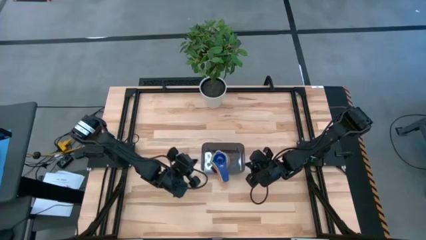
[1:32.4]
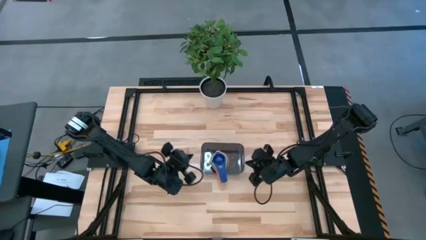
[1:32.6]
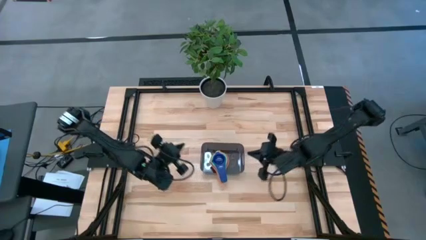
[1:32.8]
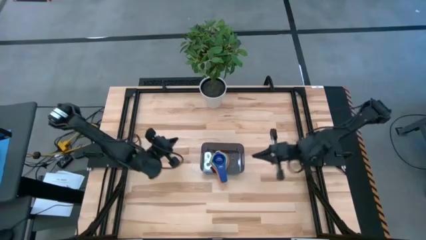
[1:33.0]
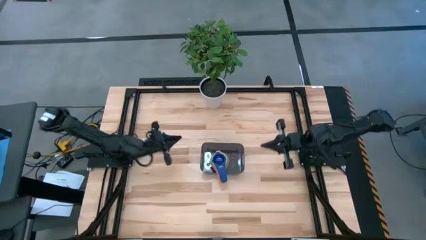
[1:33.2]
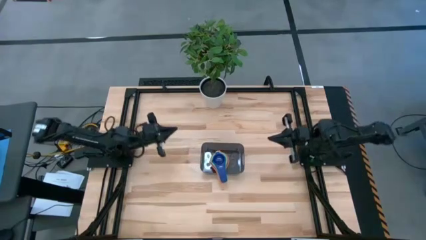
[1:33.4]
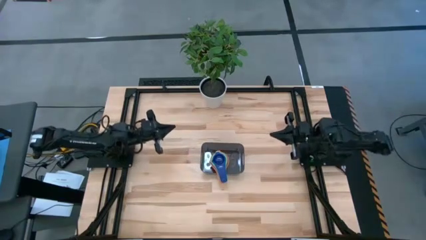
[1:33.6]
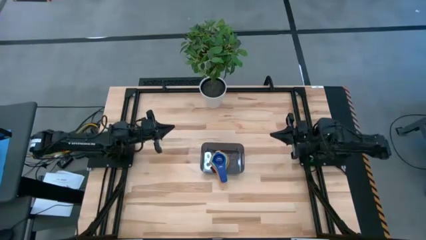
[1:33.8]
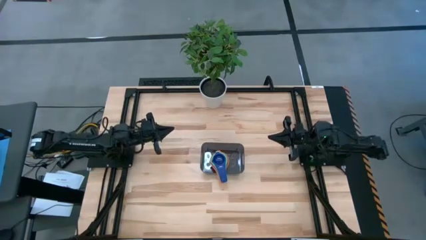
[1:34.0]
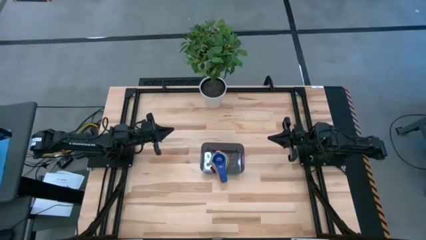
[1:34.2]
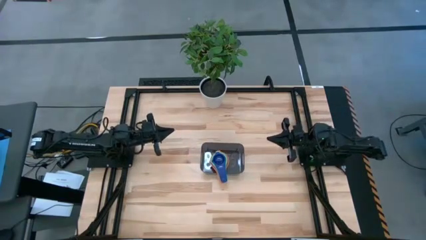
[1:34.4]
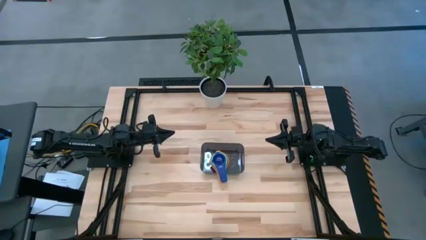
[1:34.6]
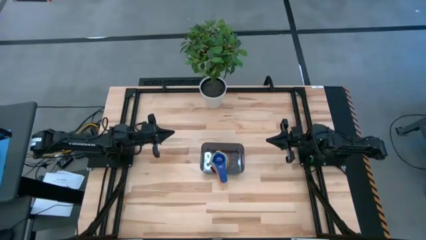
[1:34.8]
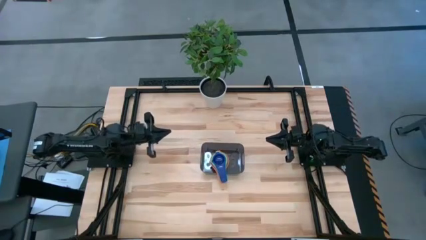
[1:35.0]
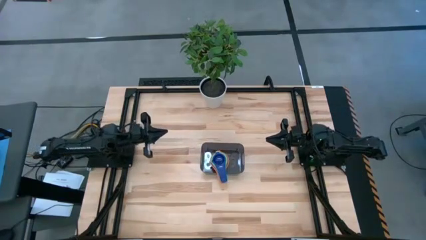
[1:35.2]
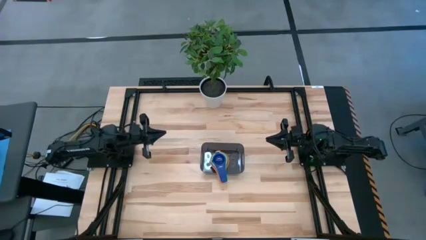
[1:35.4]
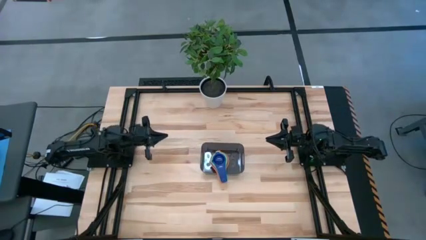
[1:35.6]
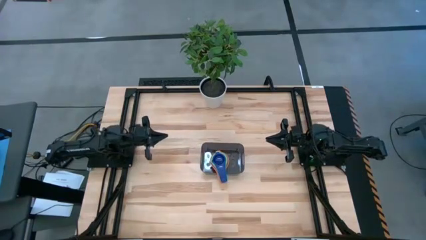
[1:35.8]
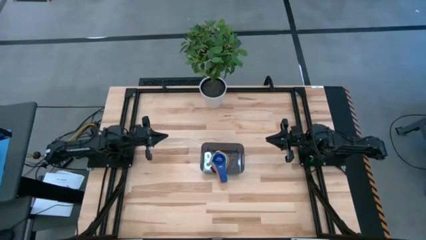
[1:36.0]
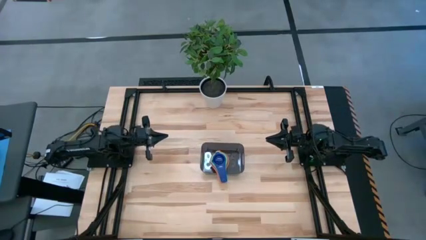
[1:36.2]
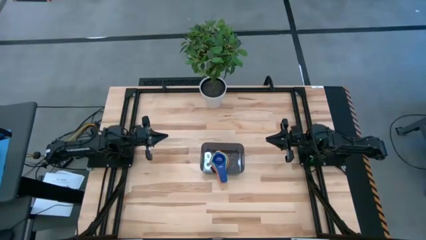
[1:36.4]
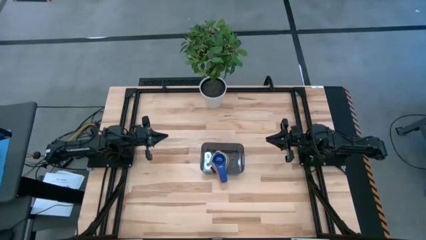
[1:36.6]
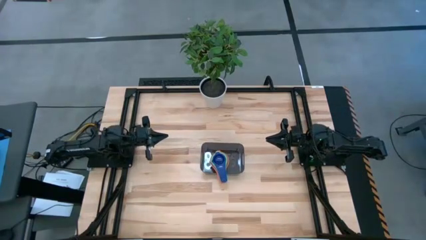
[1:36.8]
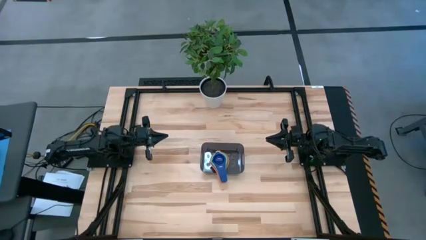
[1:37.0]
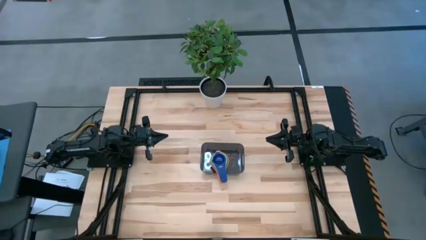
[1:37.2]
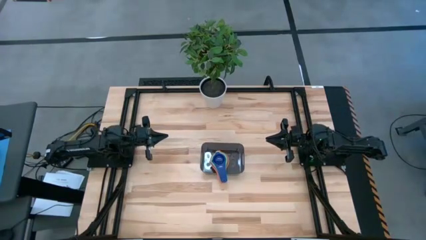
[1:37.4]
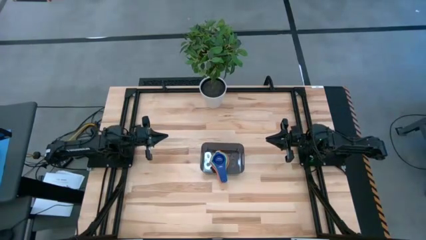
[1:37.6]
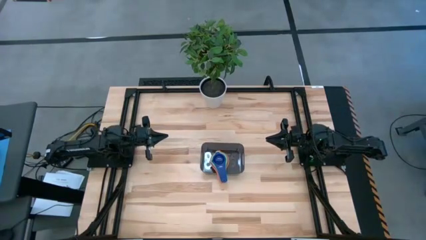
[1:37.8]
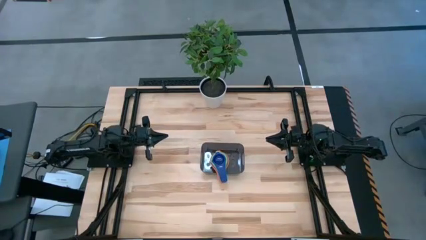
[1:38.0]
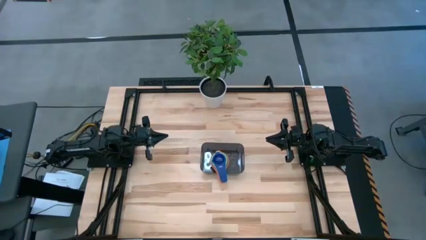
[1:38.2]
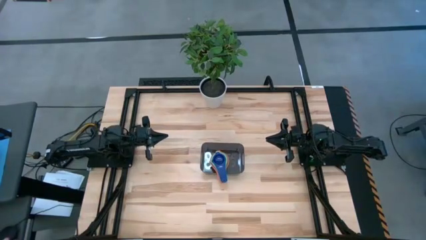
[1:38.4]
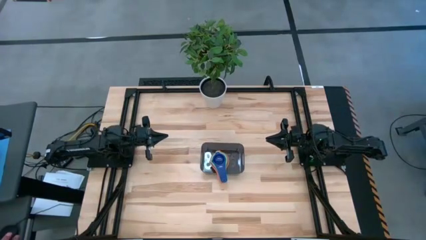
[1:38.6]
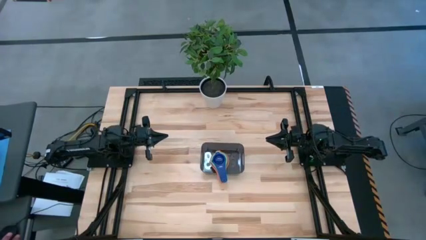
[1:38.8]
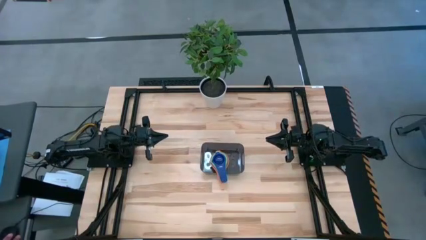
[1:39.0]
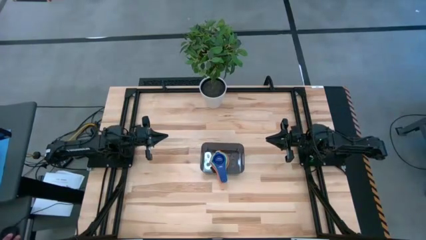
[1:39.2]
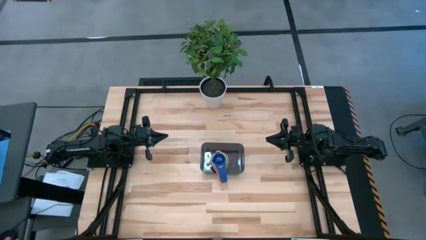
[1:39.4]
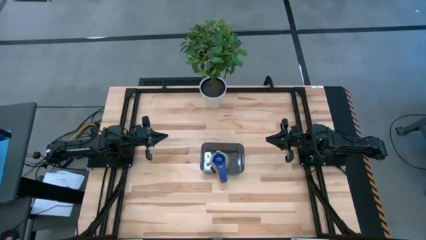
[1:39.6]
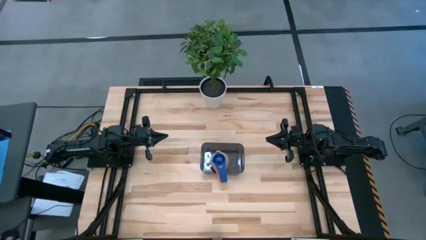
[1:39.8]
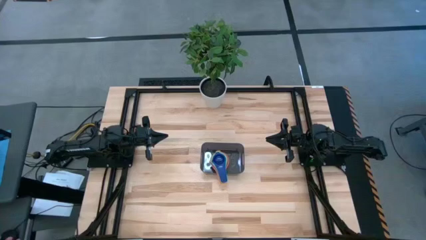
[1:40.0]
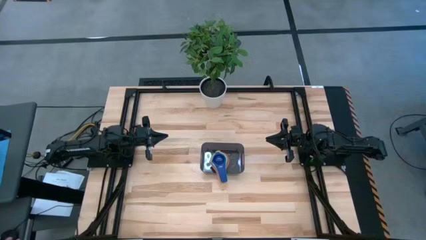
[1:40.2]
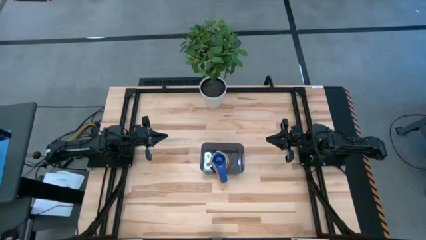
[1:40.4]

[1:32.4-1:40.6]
Task: Nest measuring cups in basket
Return to Home Position

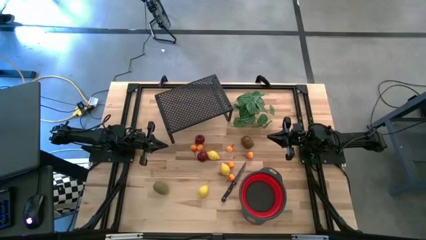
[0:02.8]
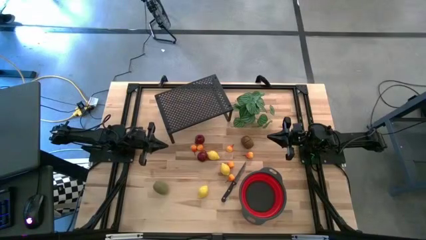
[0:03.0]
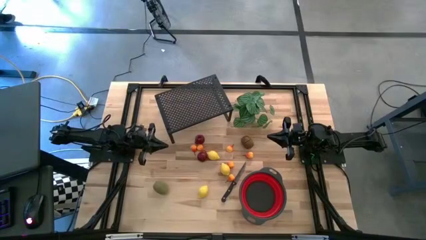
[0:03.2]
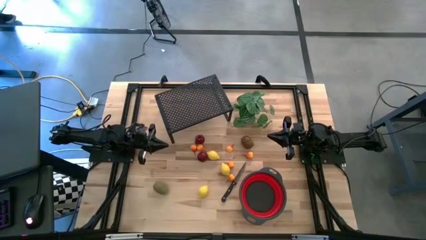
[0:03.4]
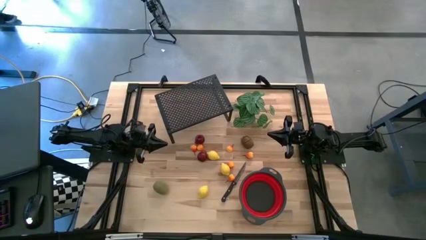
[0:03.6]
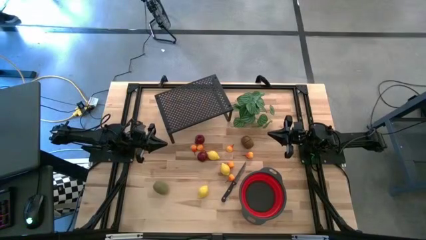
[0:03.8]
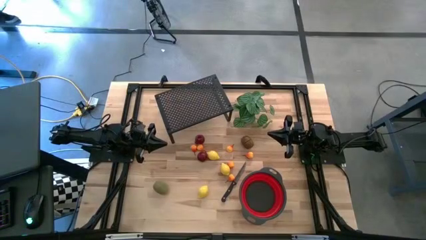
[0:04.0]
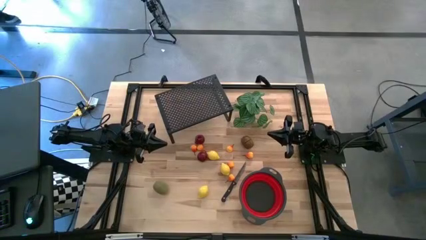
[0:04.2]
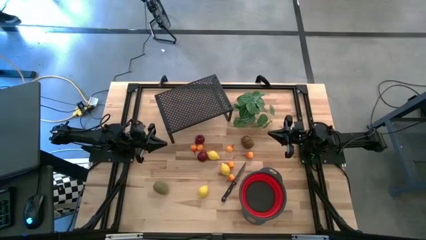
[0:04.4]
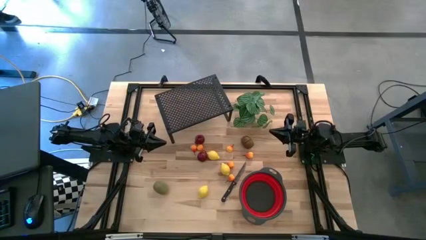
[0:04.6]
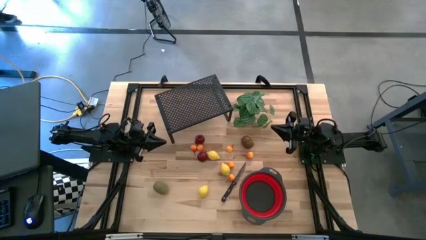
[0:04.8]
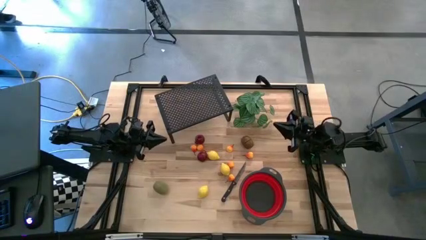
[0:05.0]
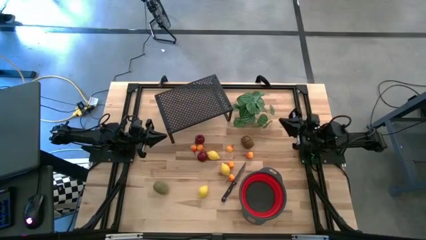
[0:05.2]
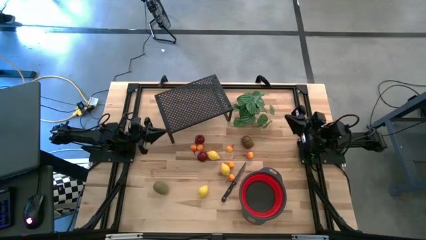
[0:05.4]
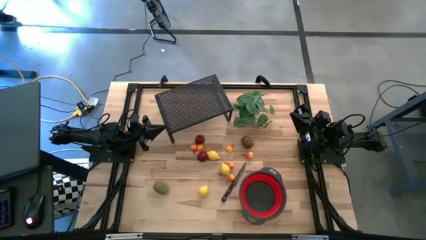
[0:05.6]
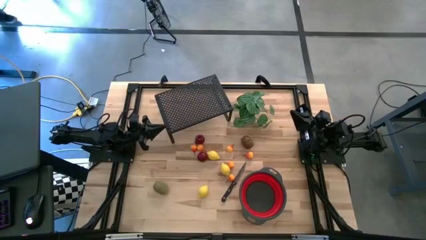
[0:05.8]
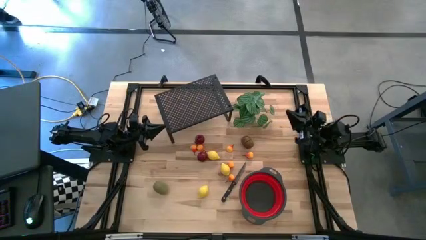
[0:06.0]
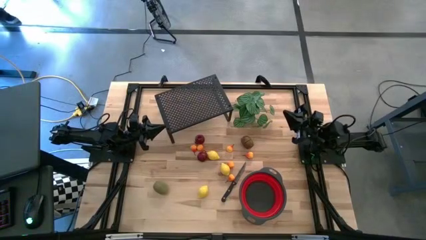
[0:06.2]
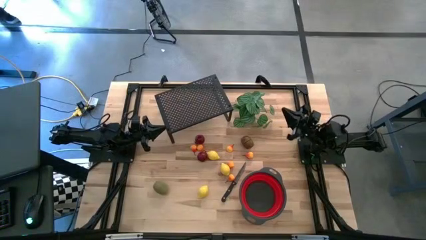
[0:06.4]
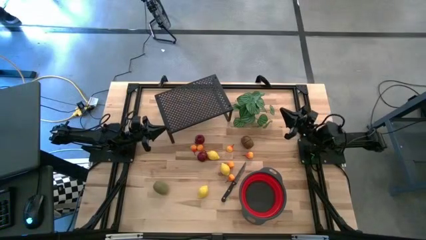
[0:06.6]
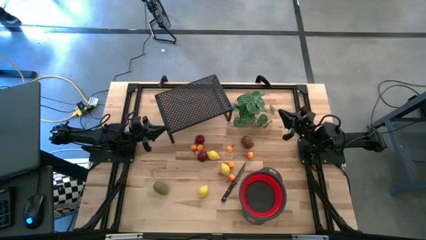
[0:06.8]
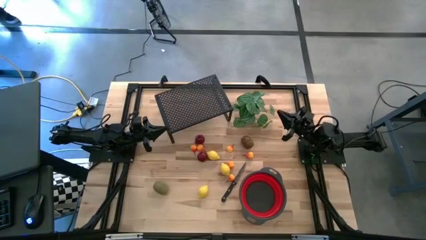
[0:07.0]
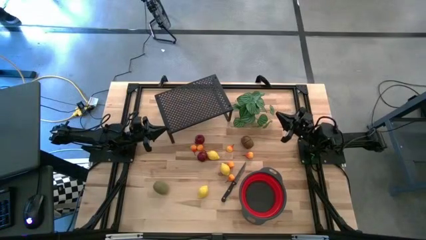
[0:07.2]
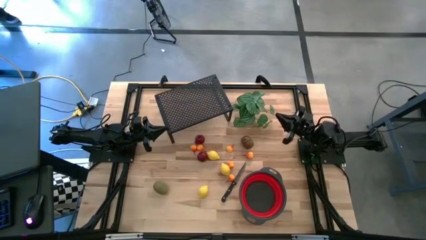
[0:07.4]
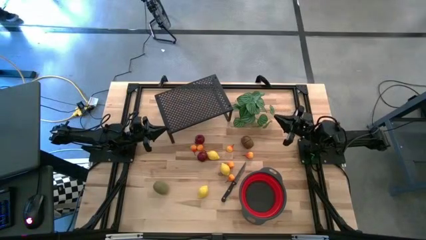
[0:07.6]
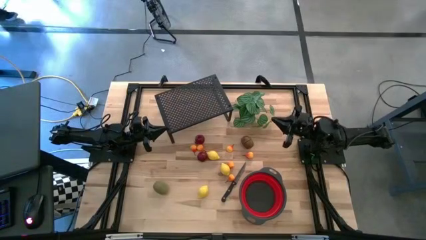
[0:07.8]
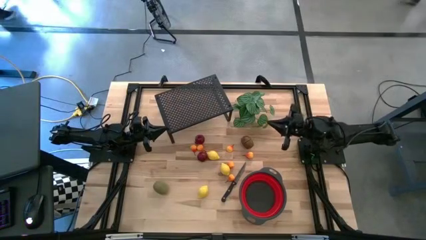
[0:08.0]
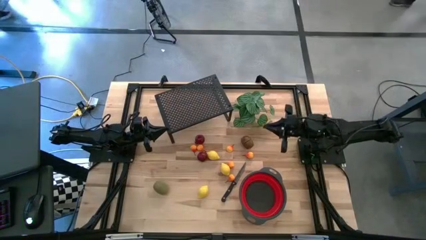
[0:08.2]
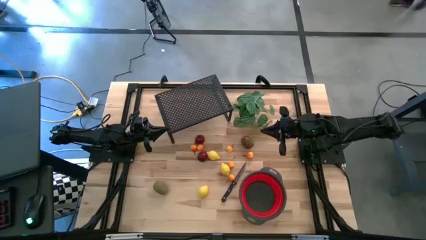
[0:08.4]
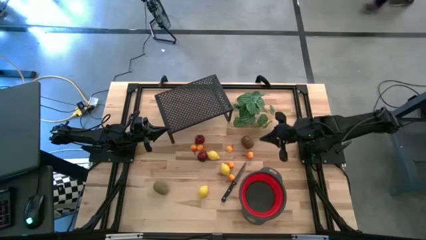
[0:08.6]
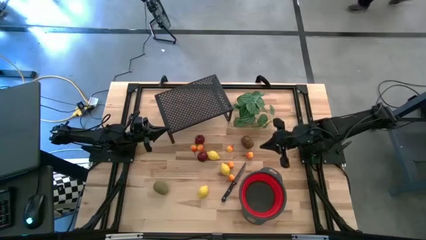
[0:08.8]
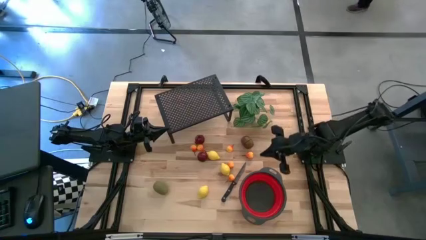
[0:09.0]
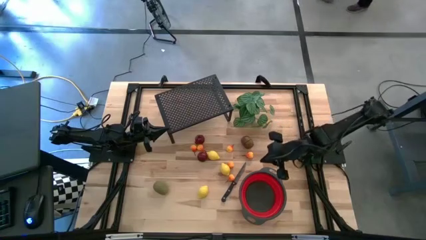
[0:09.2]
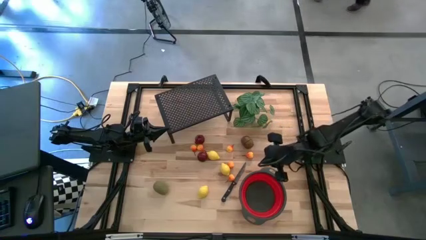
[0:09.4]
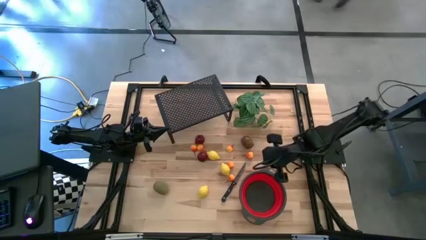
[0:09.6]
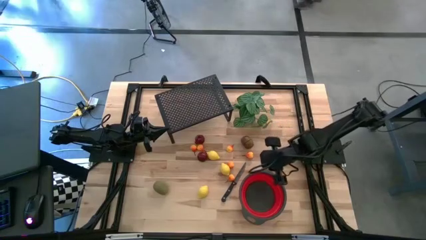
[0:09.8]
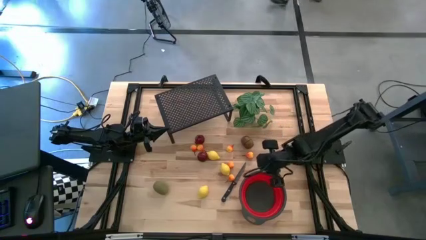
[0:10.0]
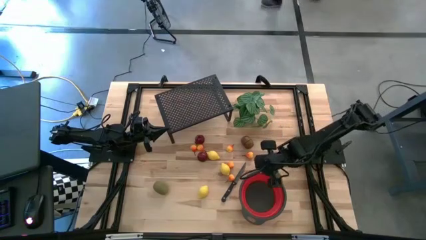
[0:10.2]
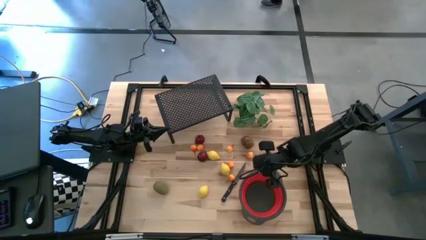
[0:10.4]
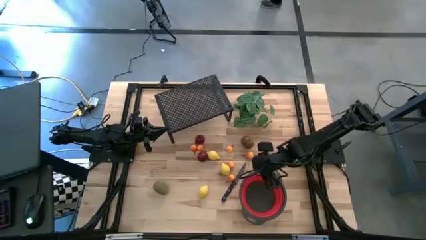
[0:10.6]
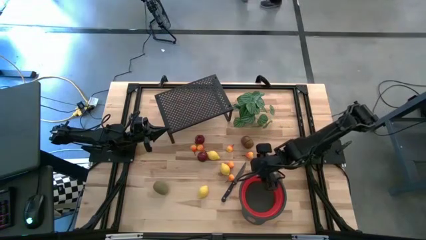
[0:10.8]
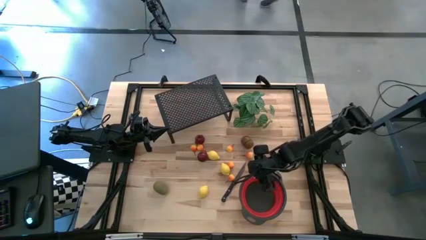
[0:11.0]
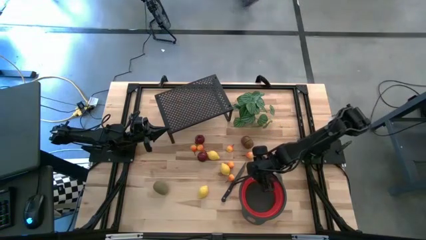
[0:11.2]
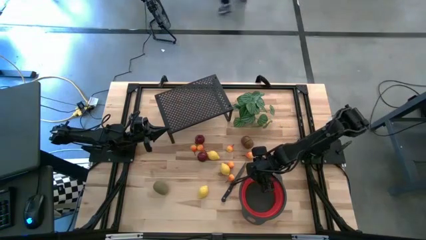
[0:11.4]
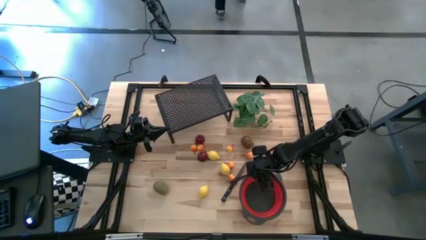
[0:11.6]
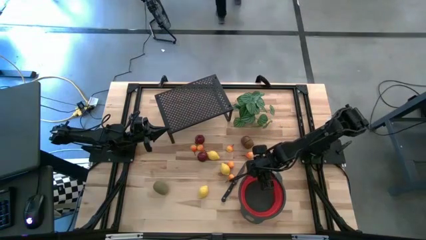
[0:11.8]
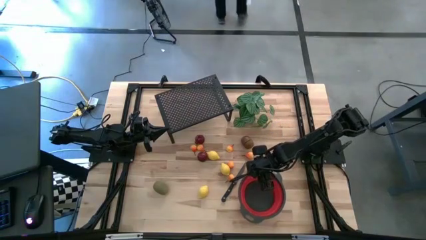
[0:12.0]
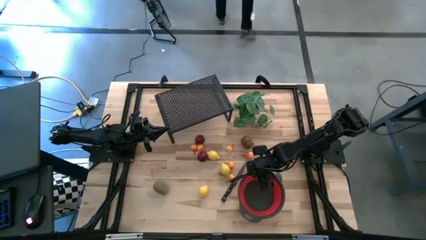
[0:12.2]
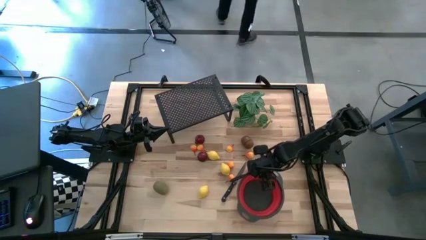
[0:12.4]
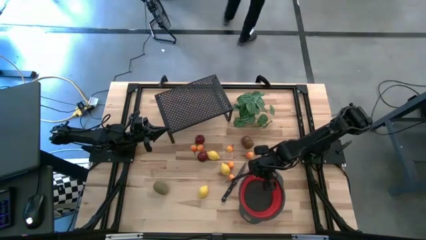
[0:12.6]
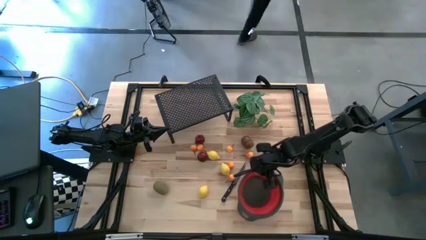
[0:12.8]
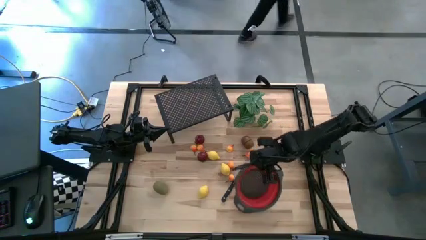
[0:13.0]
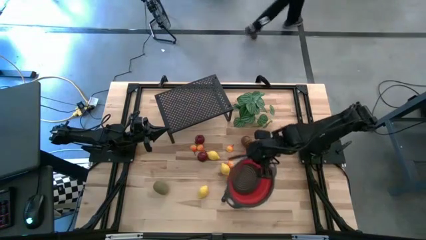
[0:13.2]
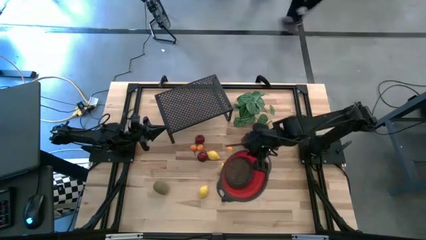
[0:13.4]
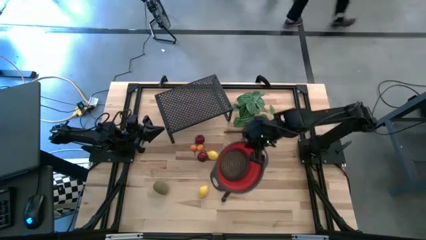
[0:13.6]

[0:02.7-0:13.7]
Task: Pick & Place Fruit
Put the red basket on the shelf
